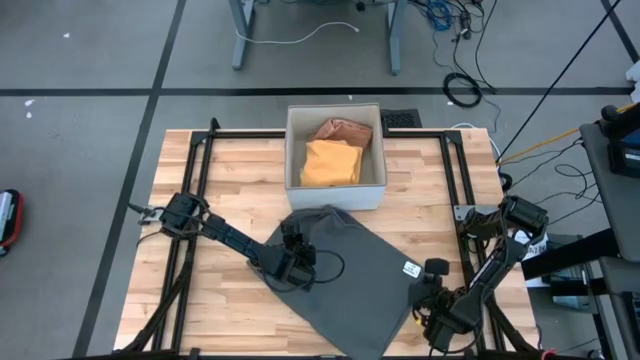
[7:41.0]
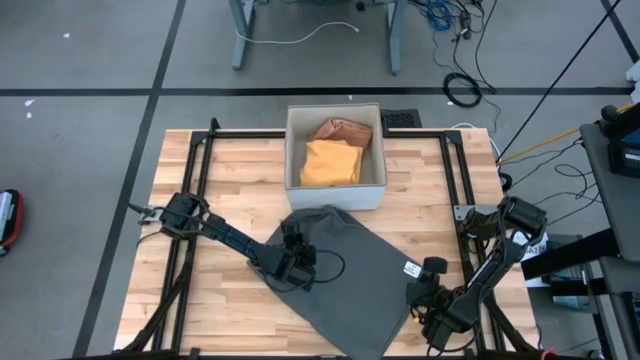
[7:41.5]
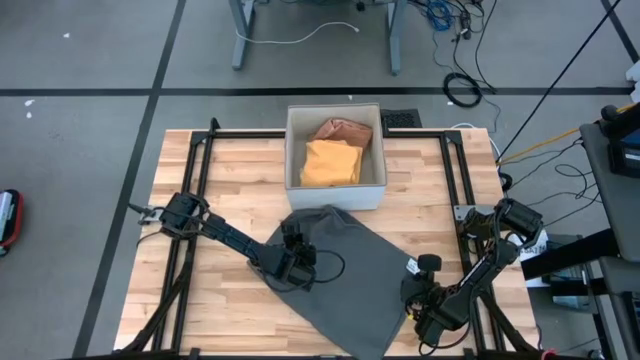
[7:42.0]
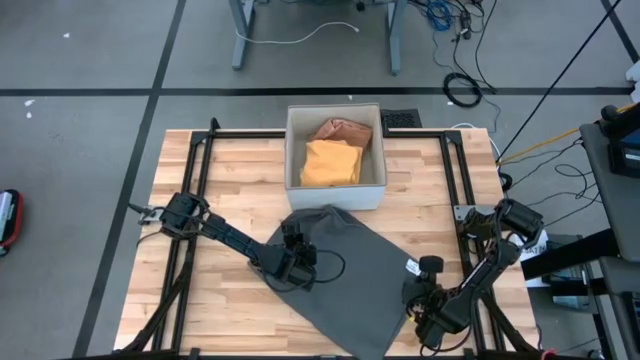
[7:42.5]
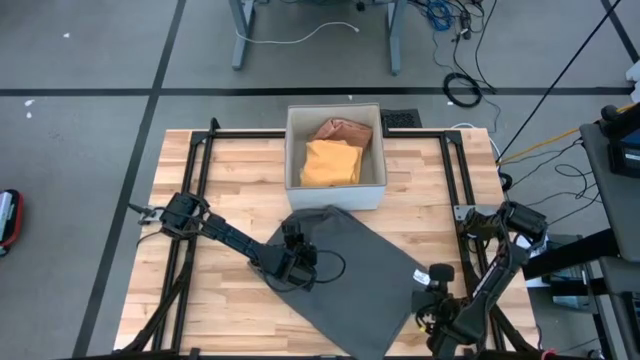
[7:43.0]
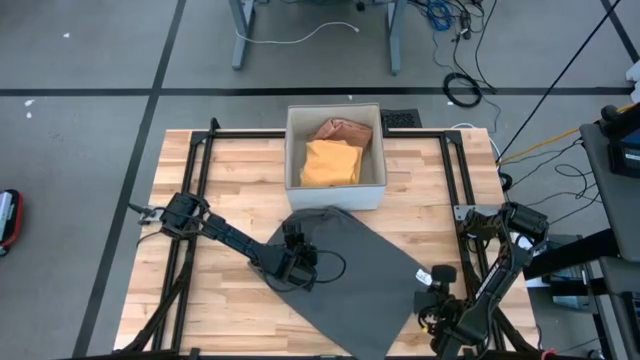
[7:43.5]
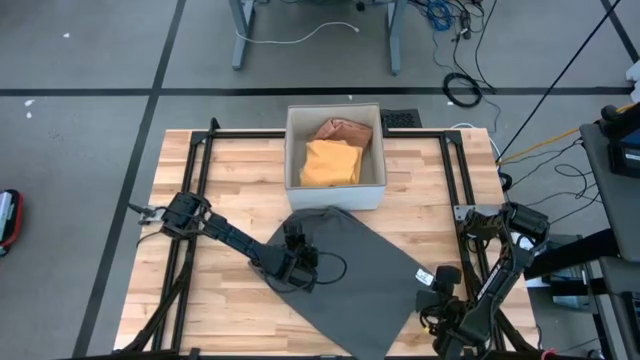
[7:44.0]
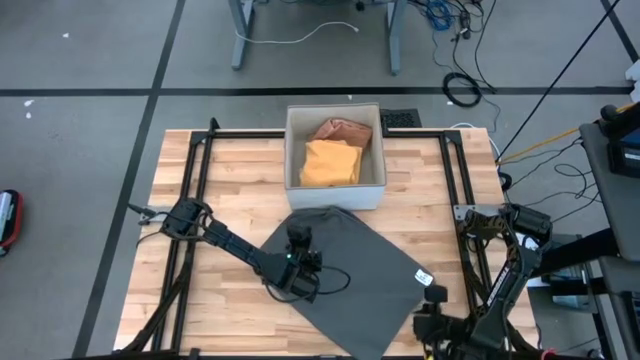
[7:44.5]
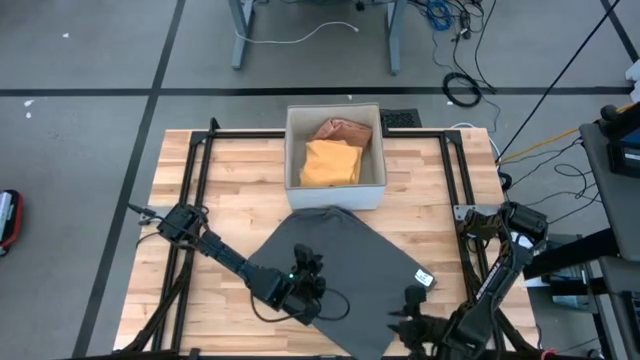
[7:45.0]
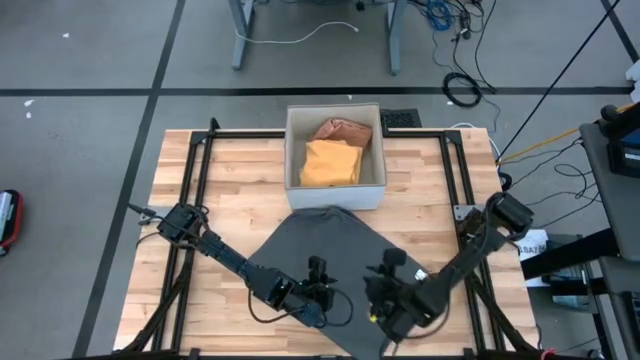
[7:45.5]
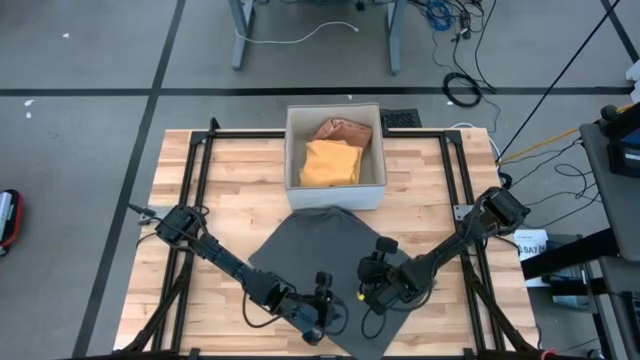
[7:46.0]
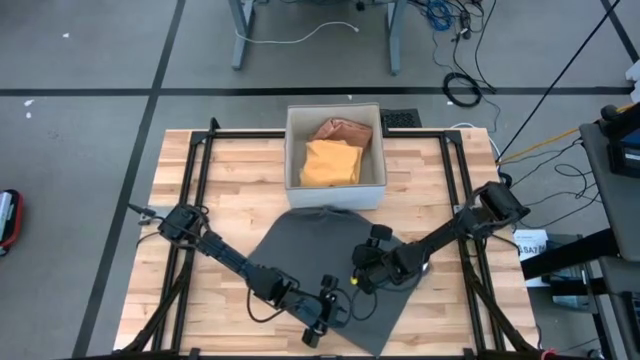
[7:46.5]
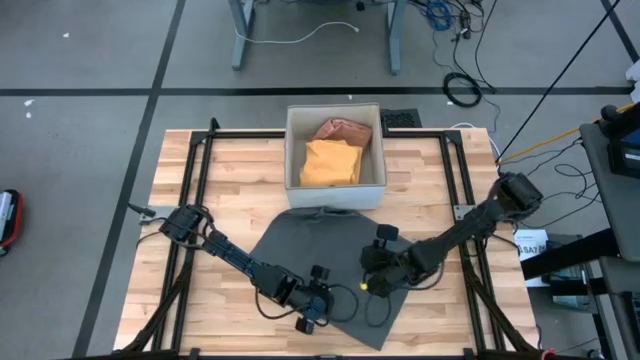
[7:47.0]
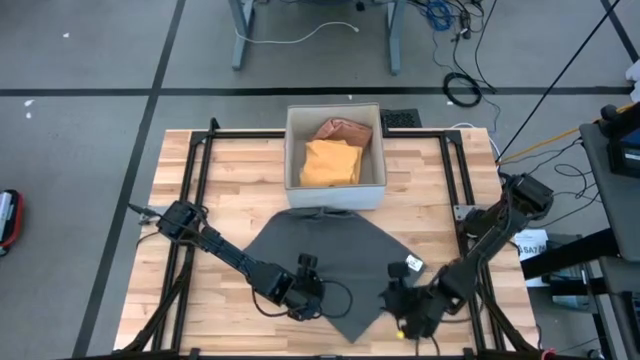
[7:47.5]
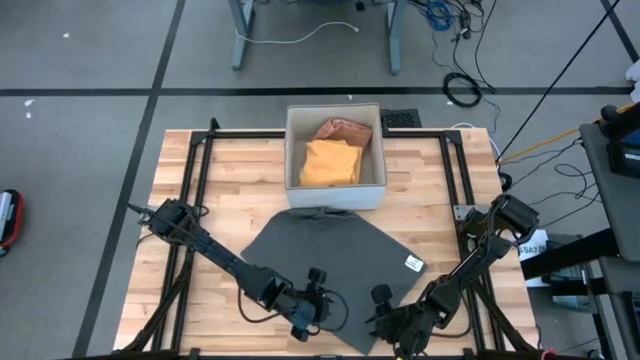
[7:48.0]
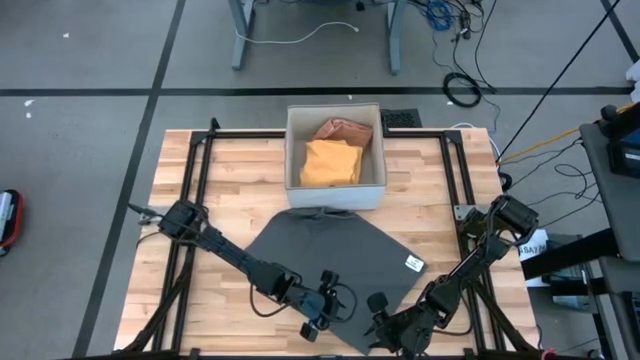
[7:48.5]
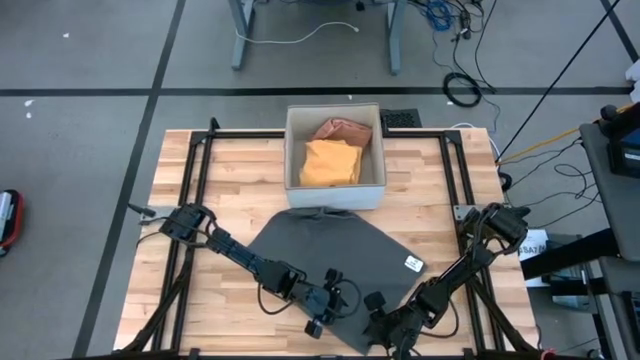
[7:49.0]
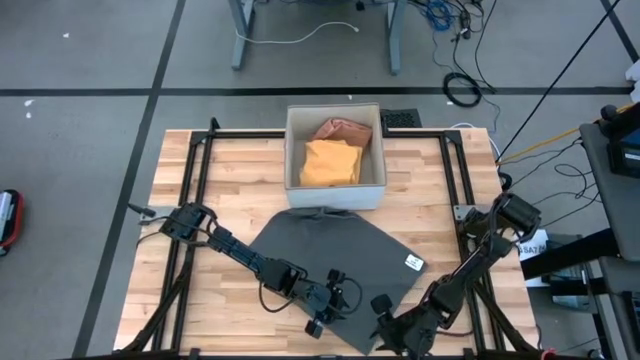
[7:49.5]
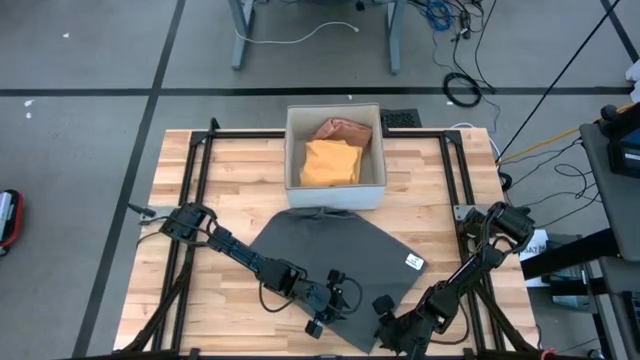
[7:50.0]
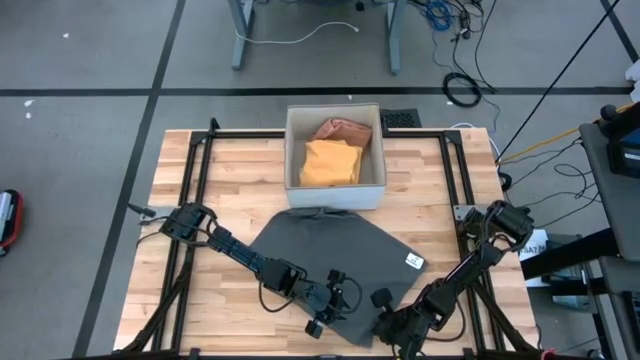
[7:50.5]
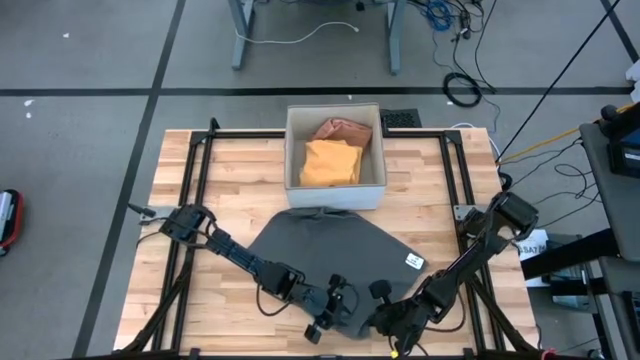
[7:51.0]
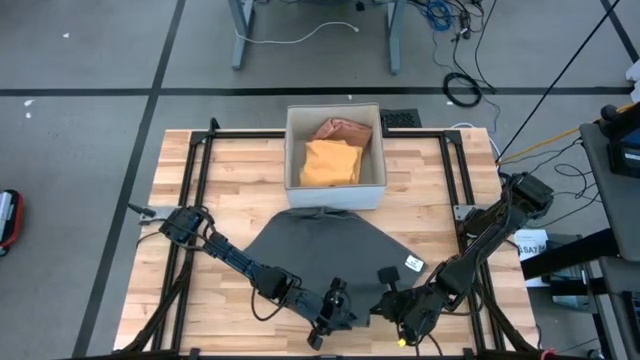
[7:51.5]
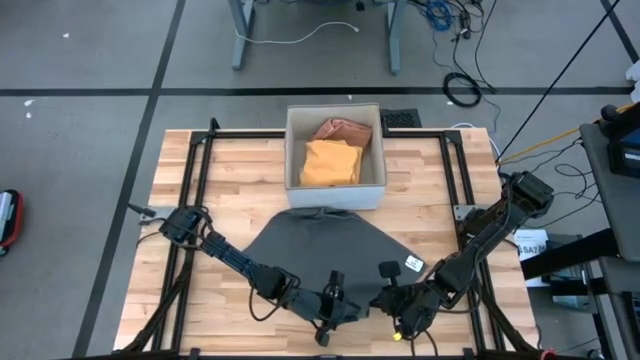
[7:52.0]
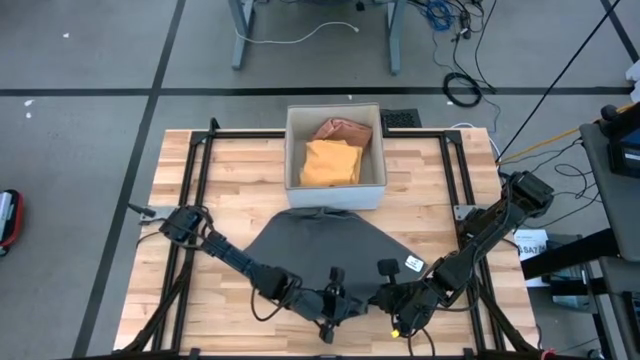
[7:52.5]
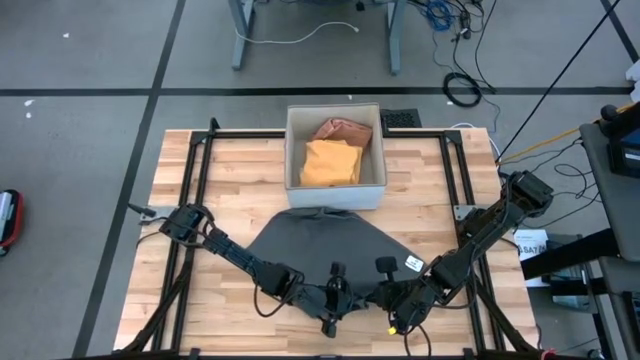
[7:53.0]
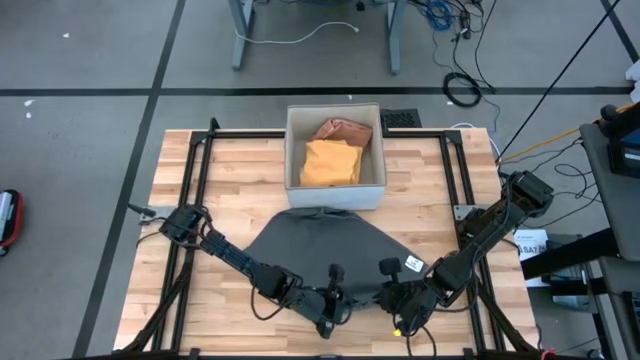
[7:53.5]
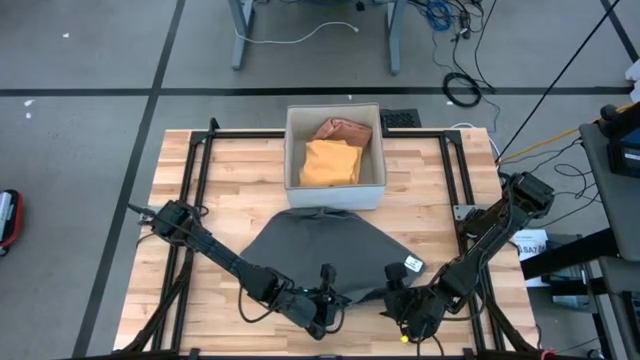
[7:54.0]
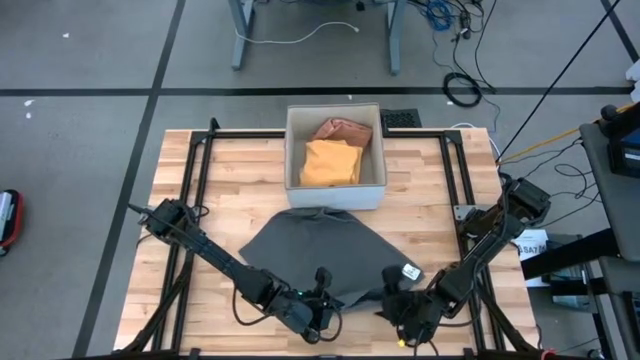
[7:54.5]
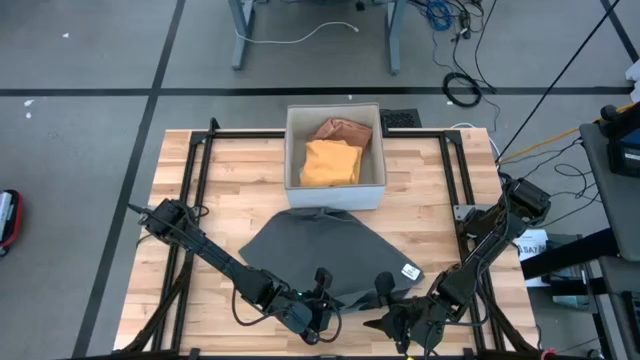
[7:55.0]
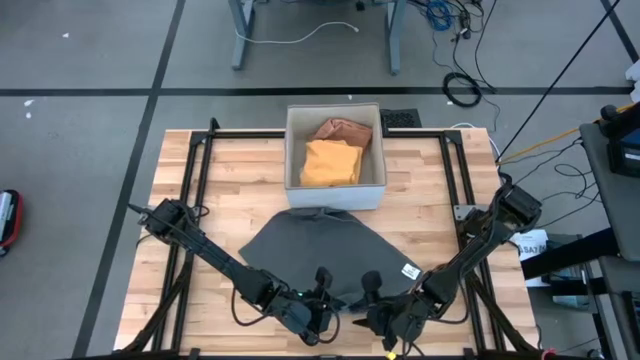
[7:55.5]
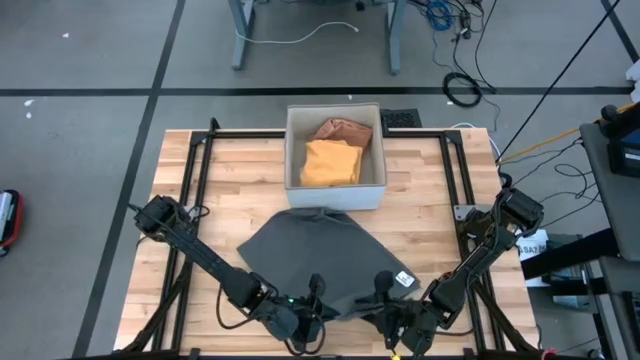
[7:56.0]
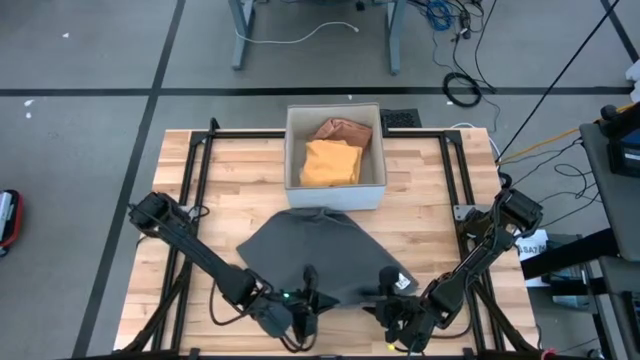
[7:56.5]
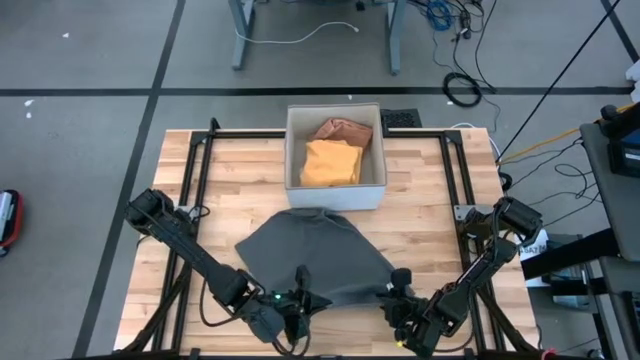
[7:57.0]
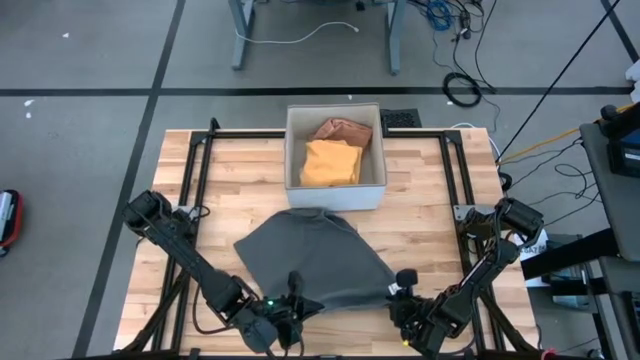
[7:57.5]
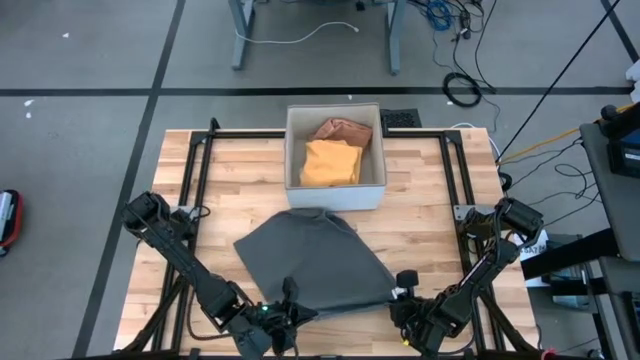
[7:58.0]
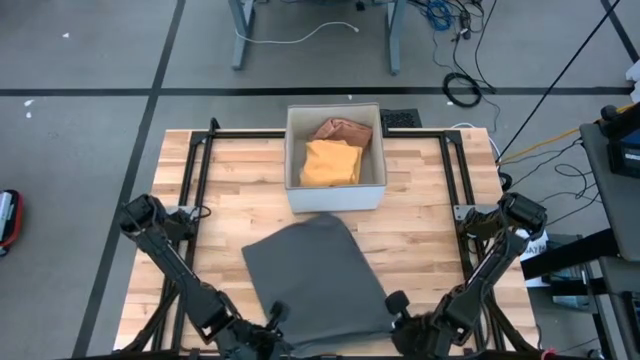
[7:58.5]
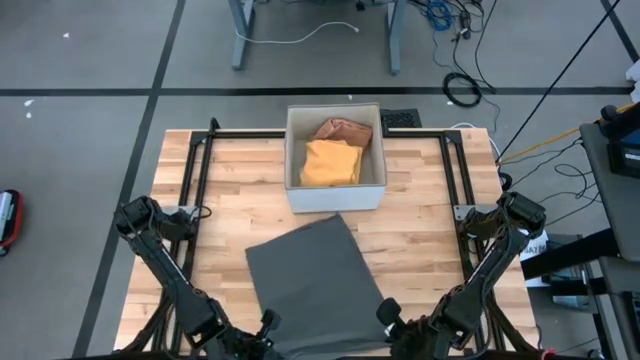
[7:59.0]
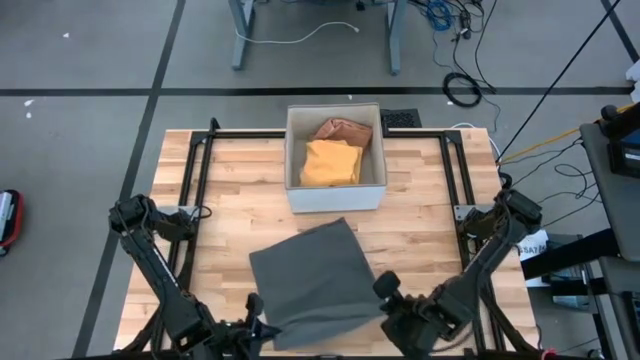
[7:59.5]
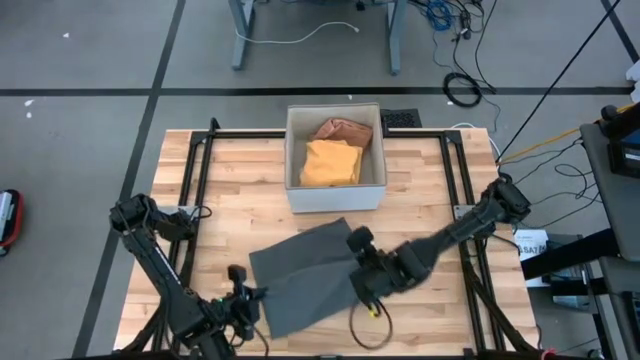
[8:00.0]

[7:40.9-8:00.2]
Task: Fold towel
Fold the gray towel
